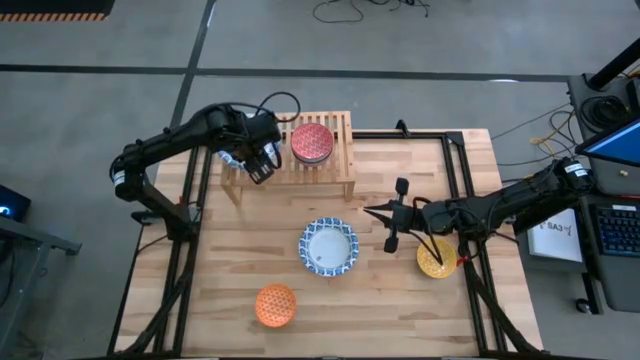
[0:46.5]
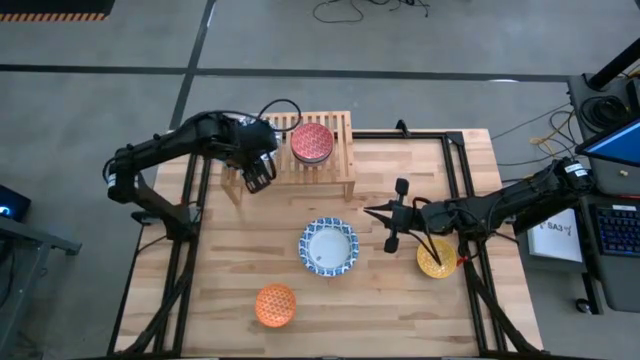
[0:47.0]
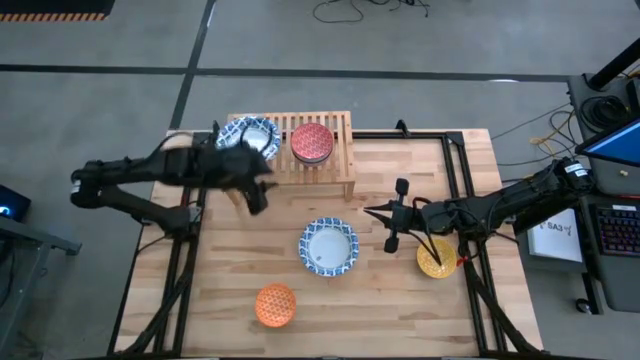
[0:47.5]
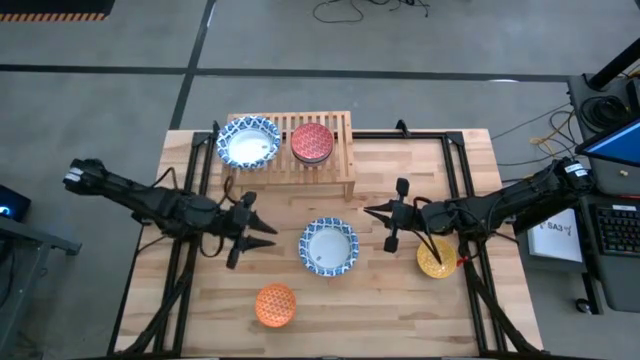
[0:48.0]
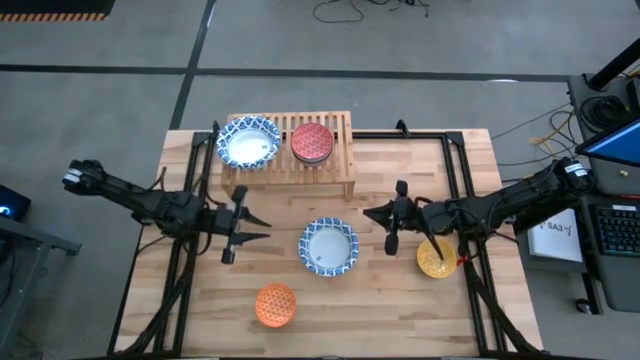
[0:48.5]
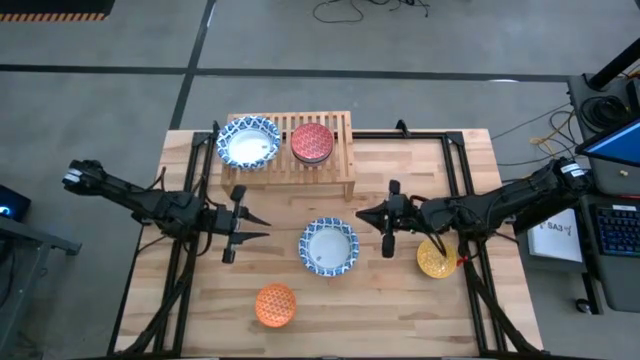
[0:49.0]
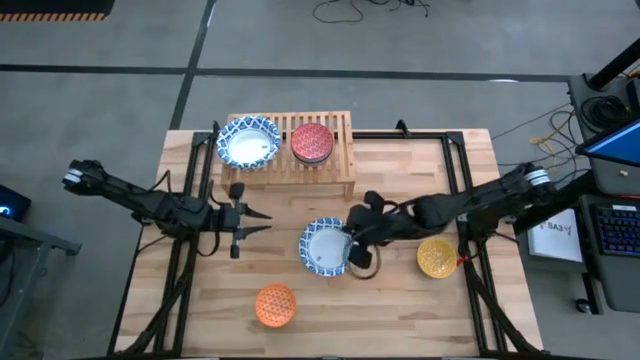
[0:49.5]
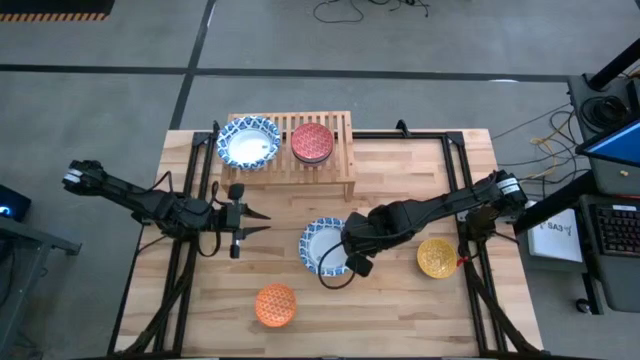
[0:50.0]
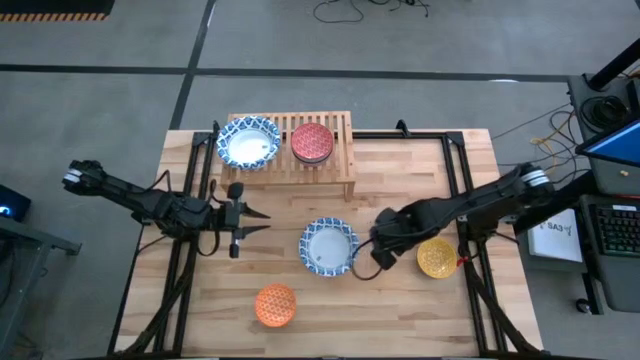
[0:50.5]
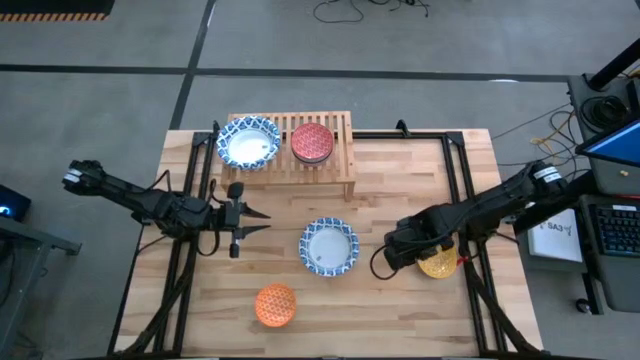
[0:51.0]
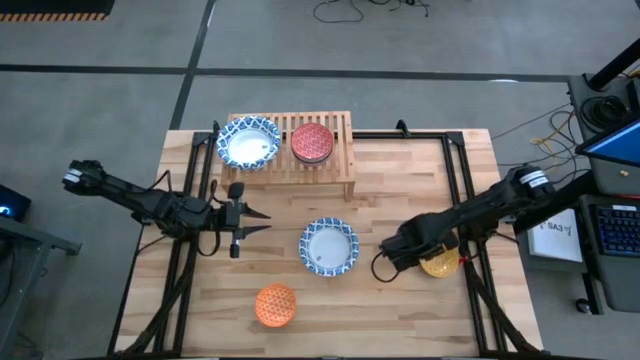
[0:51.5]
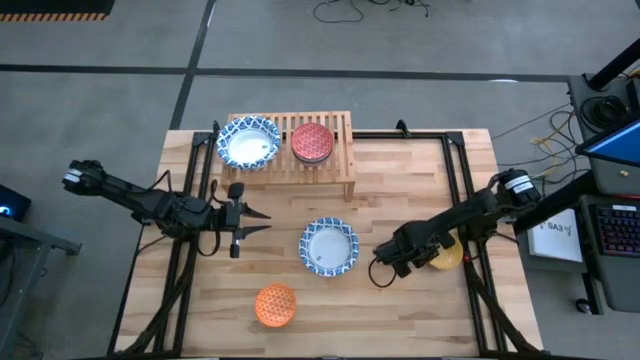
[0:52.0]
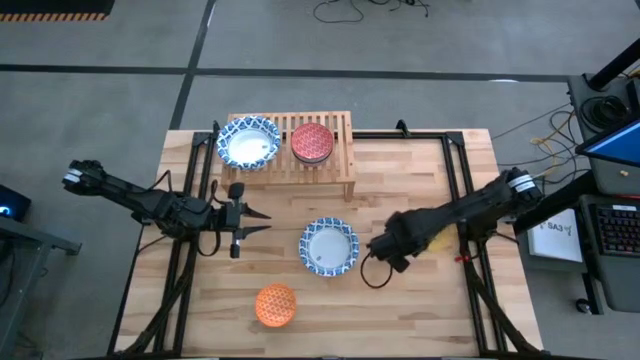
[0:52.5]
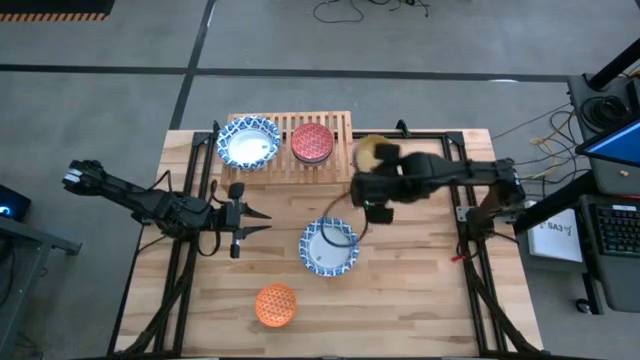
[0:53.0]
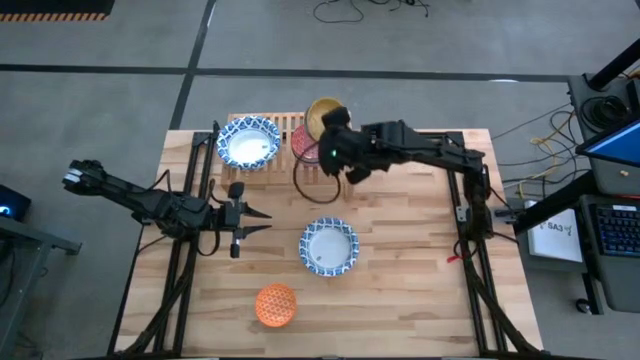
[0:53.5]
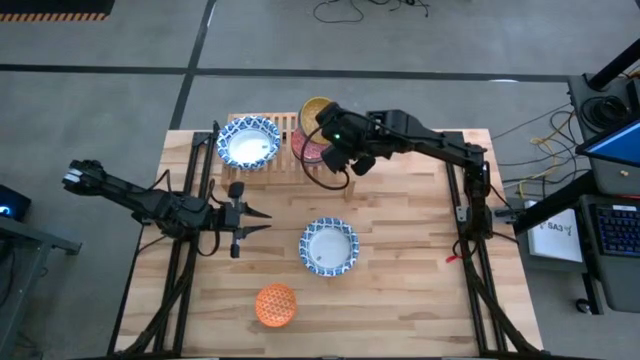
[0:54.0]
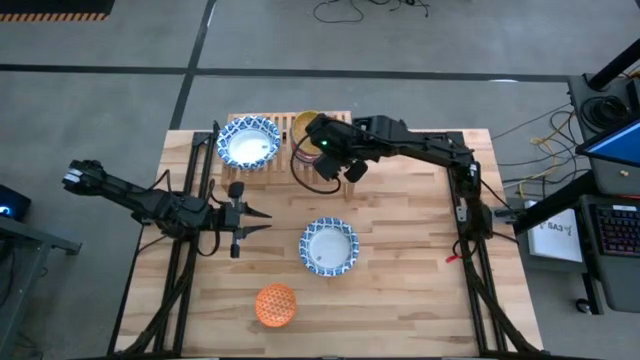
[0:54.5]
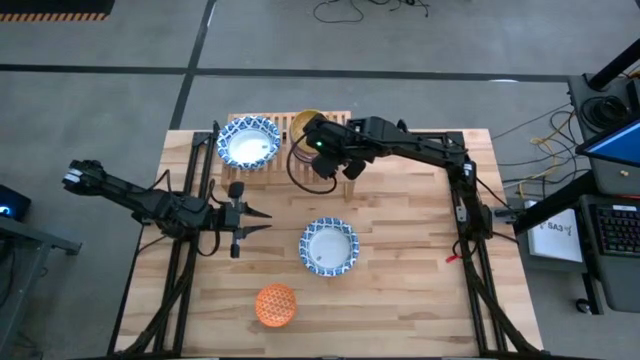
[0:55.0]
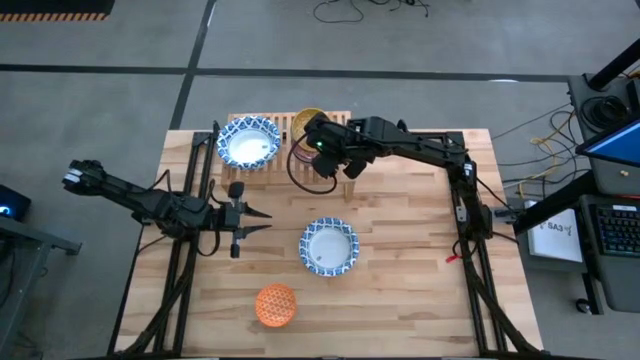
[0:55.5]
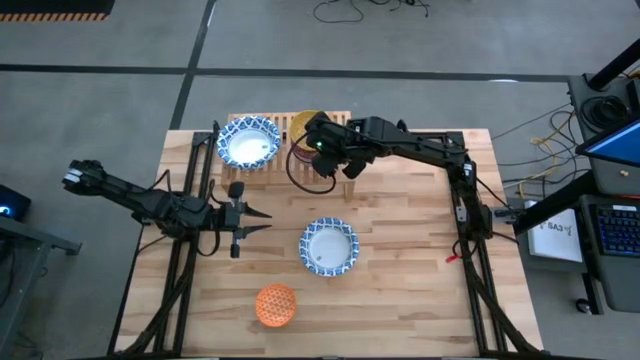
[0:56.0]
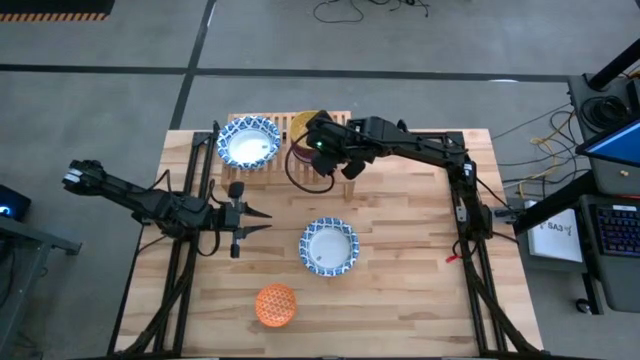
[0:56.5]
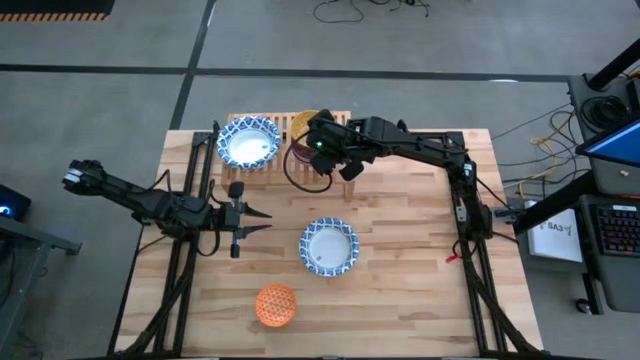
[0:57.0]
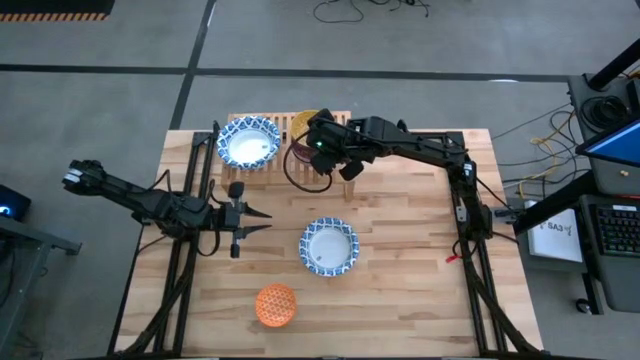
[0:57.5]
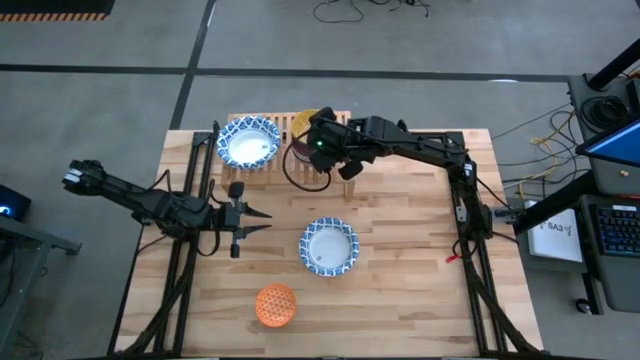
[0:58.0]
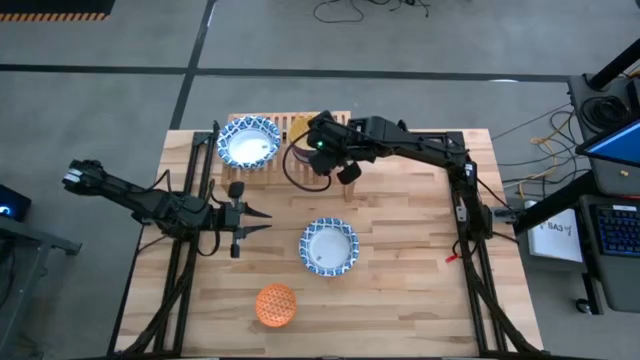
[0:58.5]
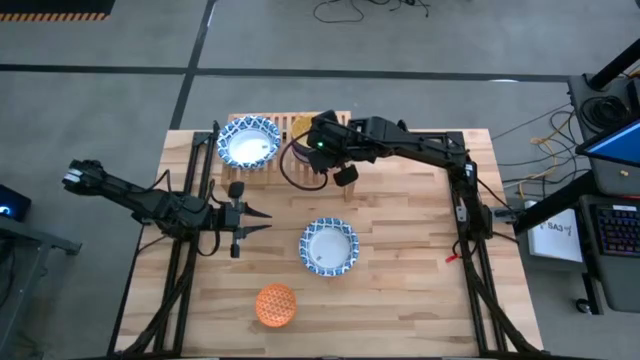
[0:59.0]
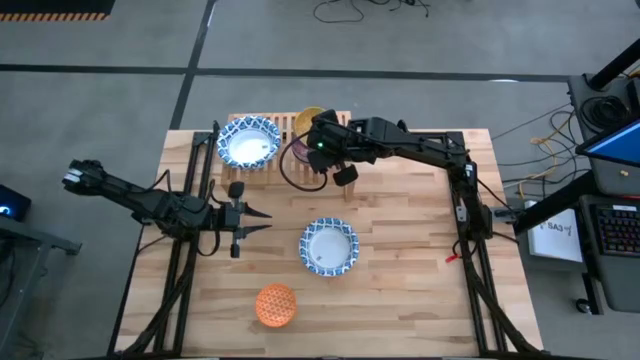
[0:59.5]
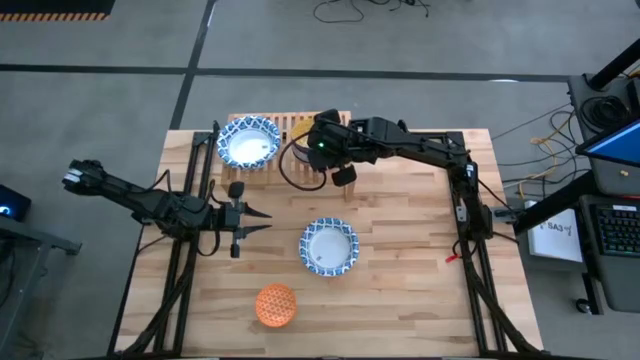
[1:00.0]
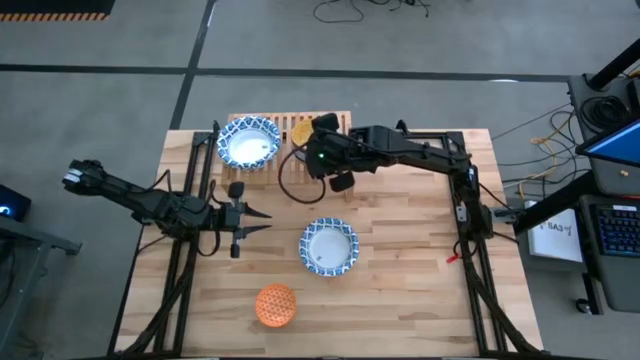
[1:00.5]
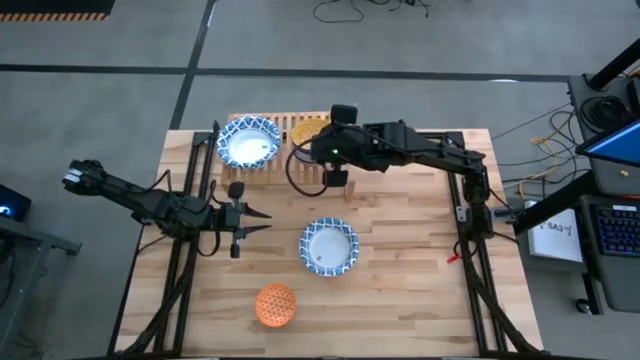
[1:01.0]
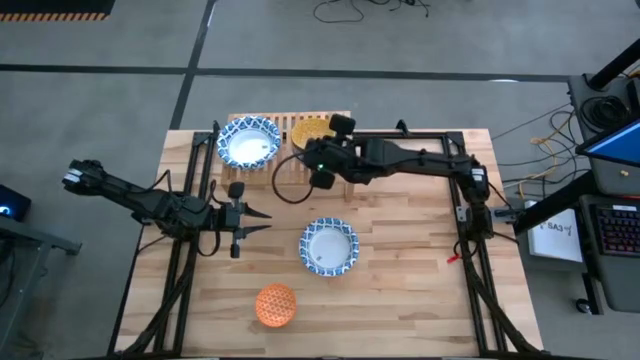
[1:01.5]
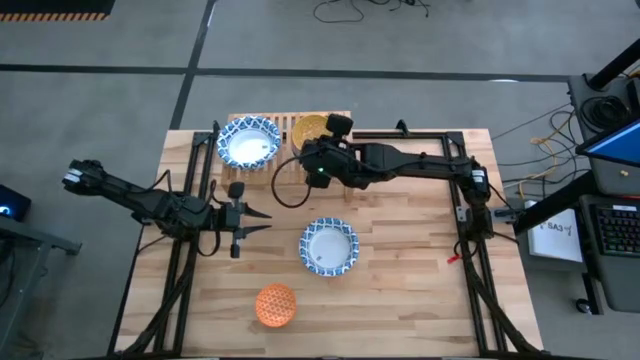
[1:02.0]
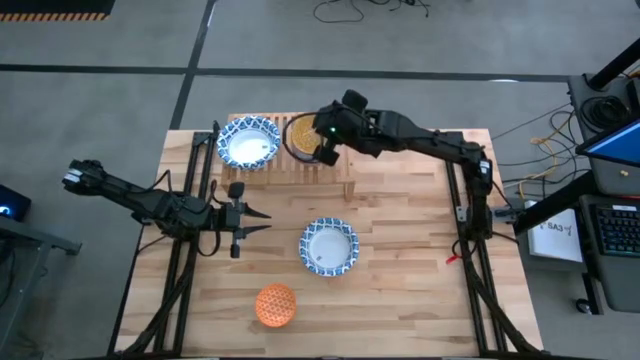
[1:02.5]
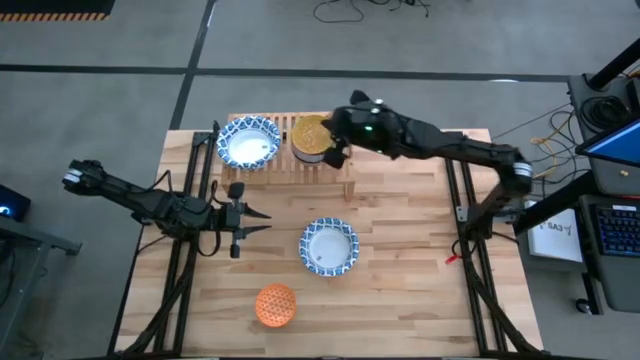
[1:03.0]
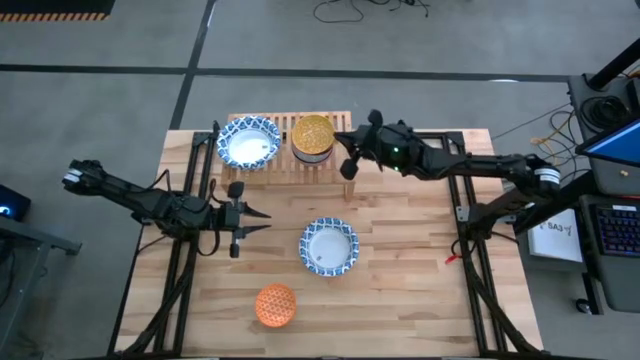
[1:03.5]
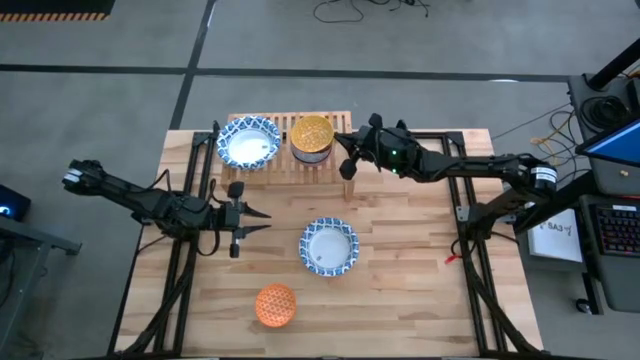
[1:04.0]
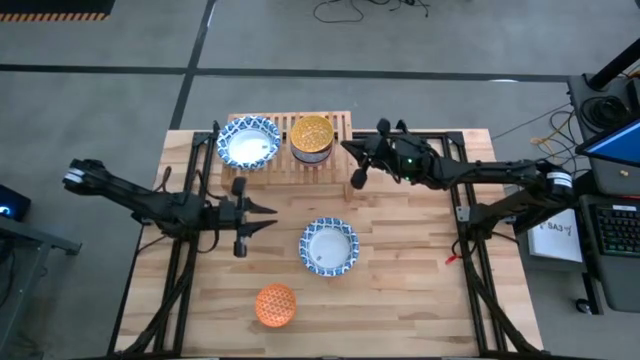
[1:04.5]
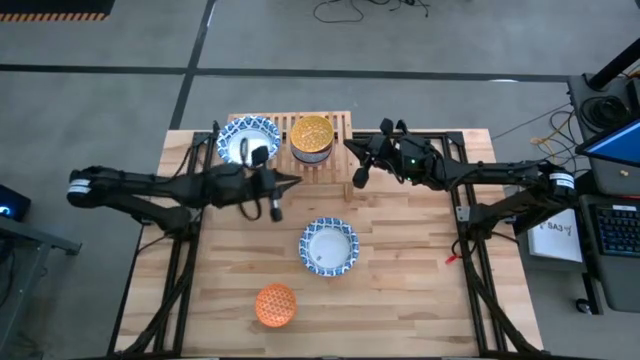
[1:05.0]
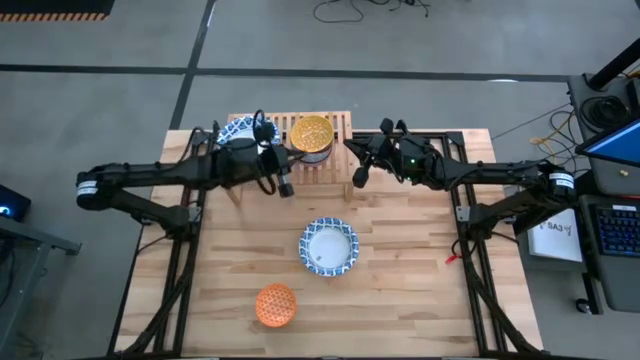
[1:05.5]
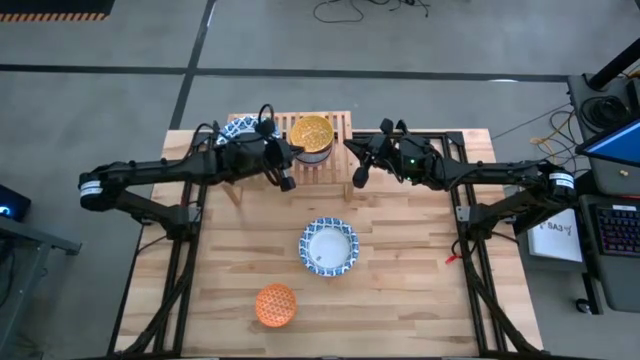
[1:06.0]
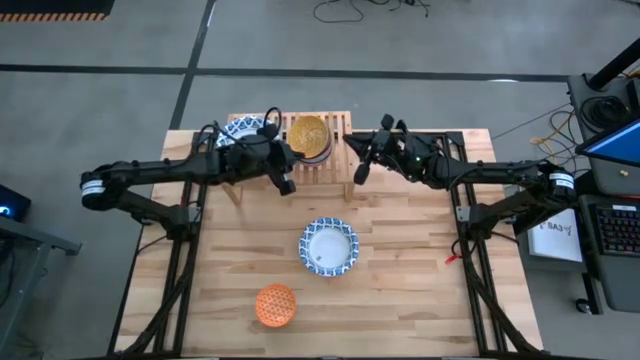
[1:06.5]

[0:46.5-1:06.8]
Task: Place and stack bowls onto a shelf
Stack the yellow pattern bowl on top of the red pattern bowl on the shelf
